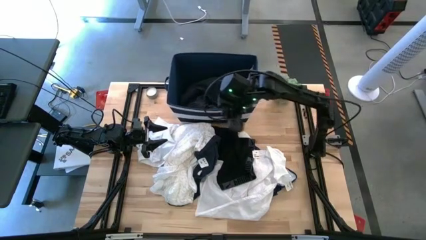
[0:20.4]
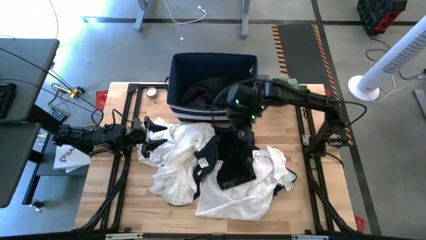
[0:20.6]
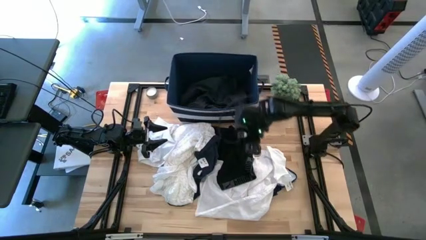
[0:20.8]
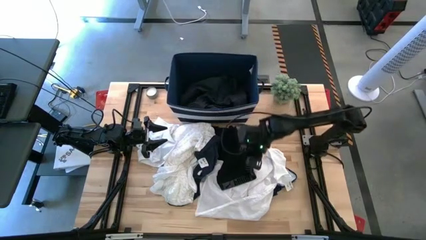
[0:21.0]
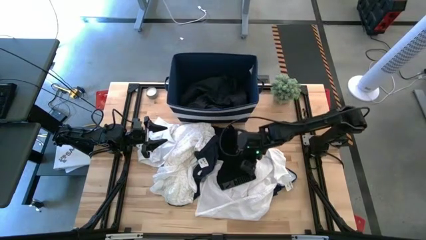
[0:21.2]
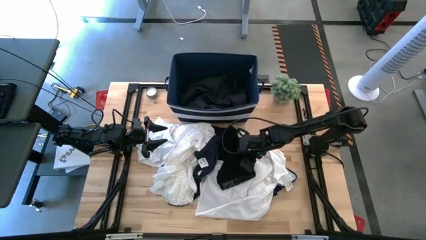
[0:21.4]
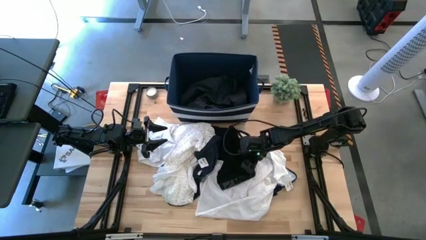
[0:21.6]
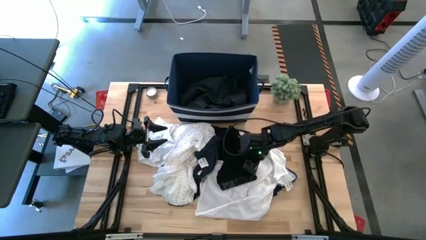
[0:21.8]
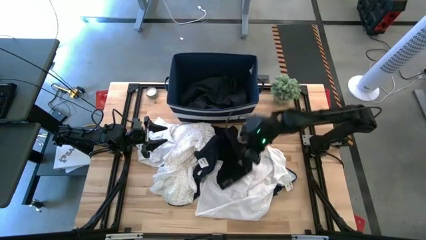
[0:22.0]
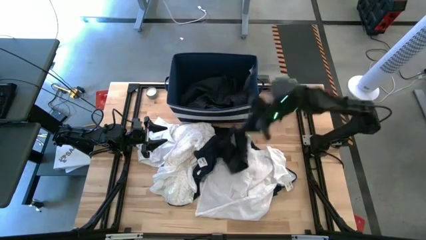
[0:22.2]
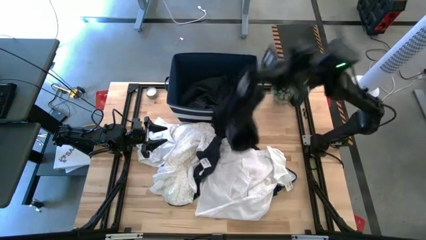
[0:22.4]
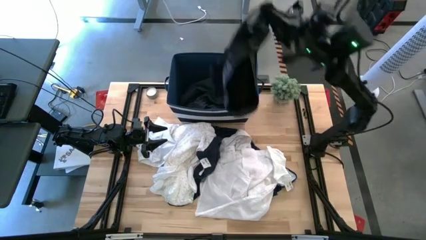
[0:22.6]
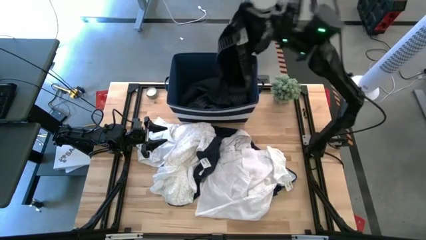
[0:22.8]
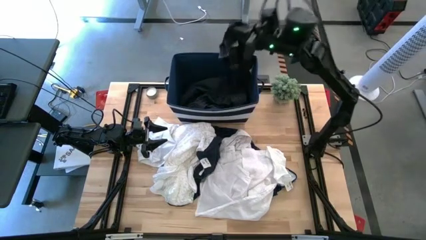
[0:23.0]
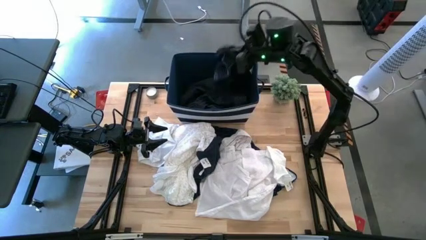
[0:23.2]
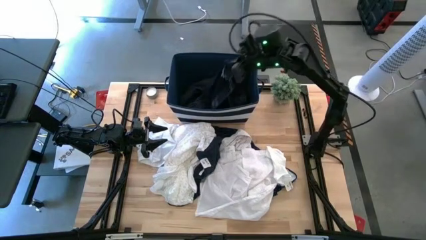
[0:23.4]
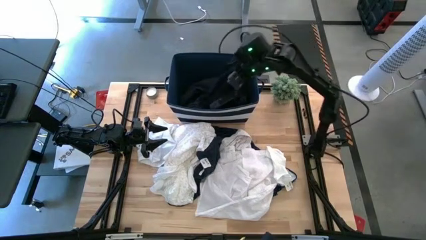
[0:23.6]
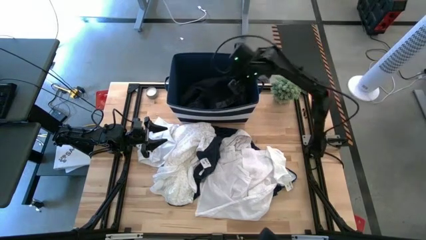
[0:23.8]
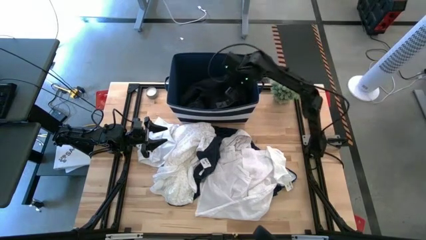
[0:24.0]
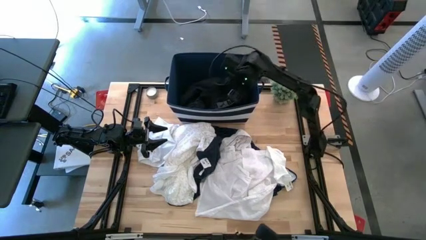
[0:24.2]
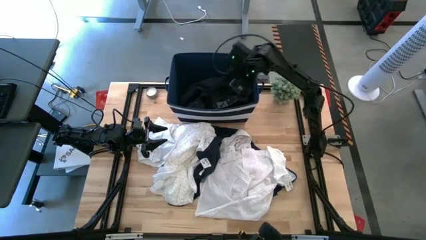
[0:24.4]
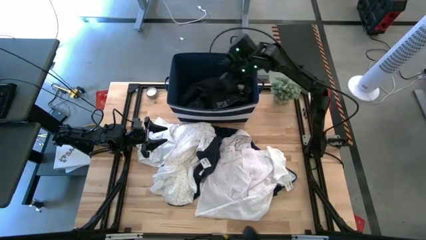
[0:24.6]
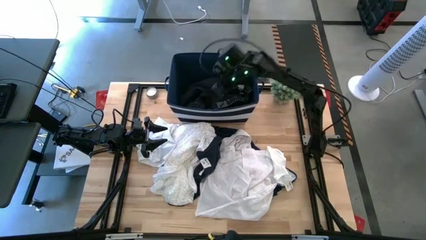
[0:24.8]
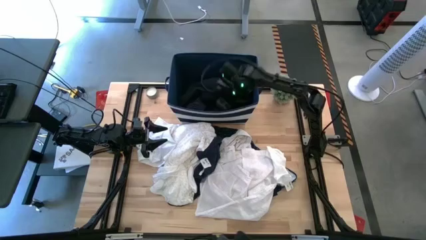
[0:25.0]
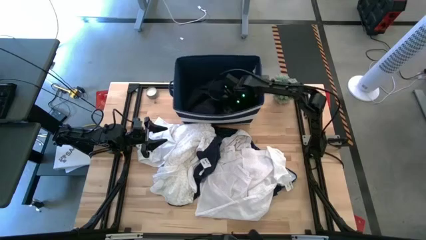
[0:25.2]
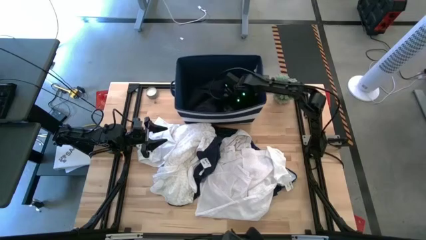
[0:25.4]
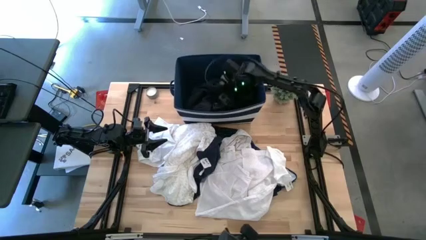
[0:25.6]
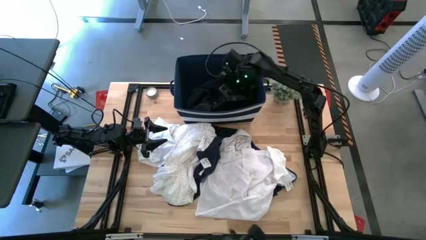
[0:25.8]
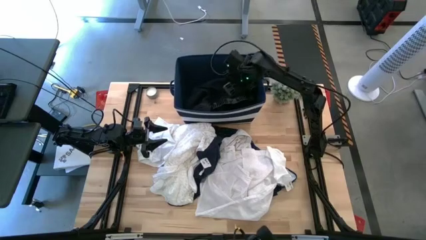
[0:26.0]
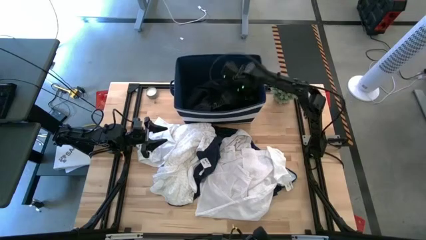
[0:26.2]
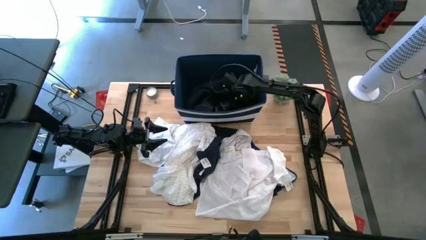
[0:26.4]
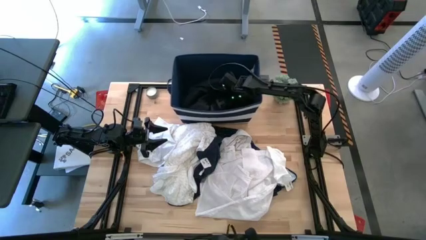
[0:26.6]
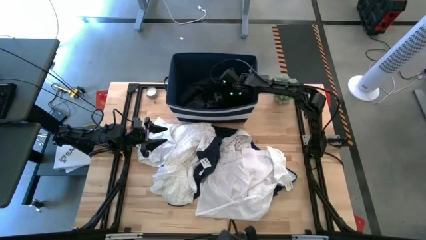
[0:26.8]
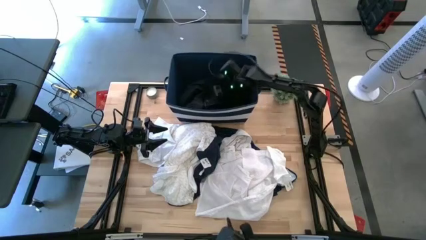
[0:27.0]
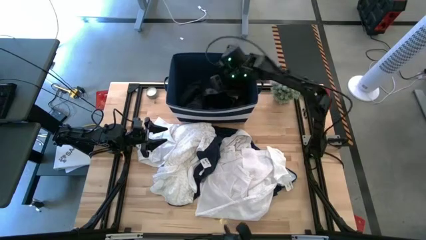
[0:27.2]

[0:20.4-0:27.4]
Task: Sort clothes
Put the black boxer into the blue bin

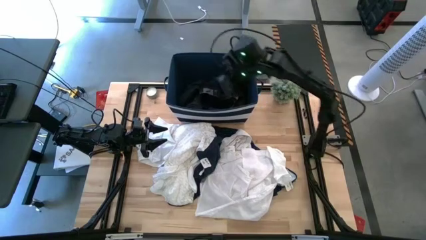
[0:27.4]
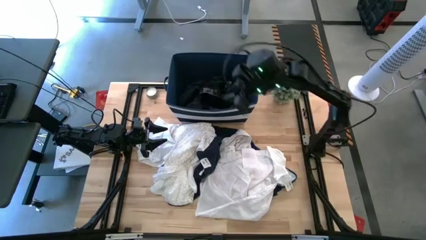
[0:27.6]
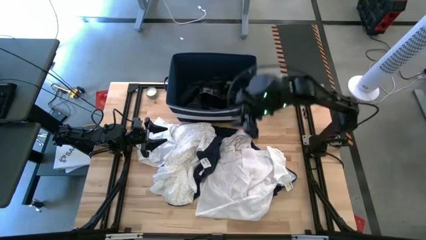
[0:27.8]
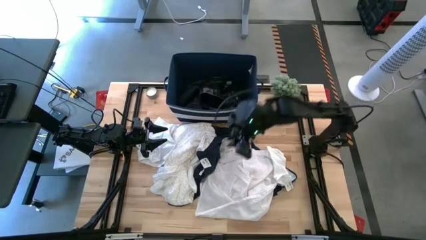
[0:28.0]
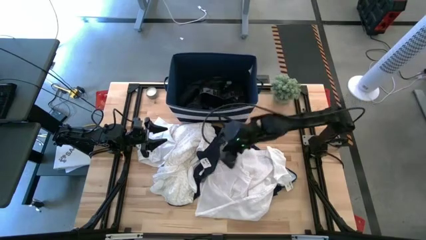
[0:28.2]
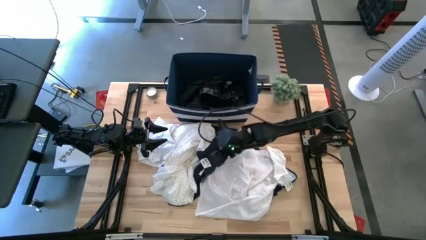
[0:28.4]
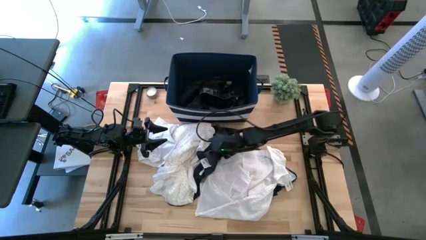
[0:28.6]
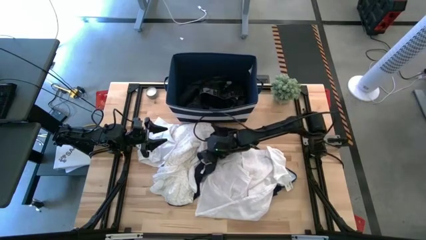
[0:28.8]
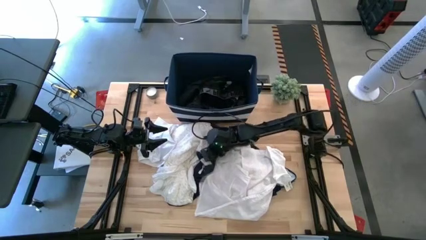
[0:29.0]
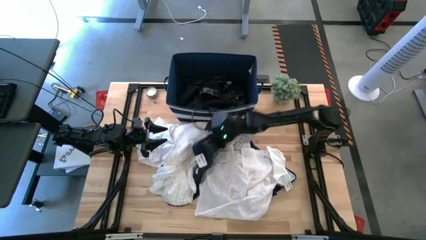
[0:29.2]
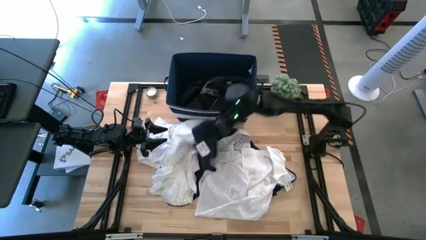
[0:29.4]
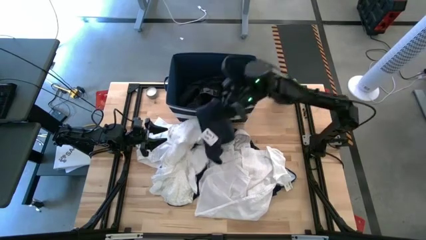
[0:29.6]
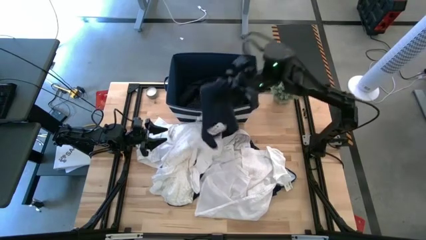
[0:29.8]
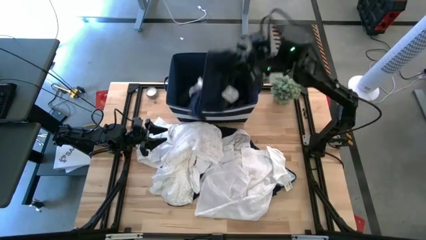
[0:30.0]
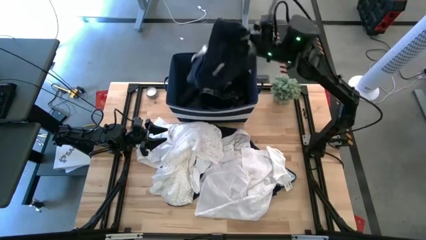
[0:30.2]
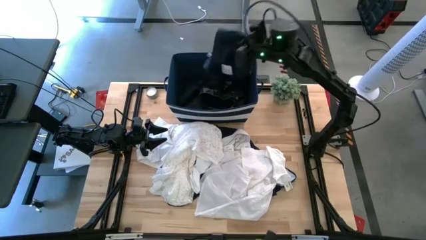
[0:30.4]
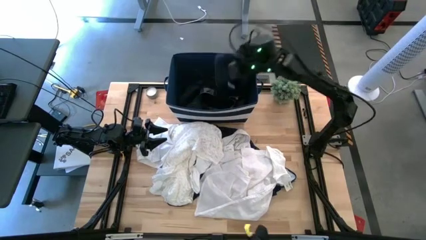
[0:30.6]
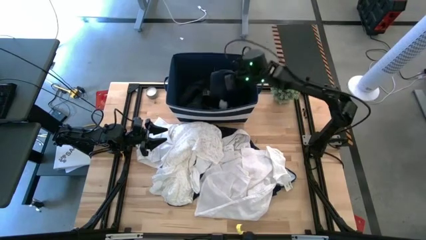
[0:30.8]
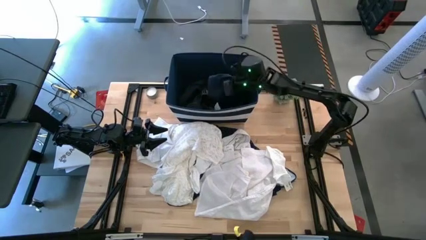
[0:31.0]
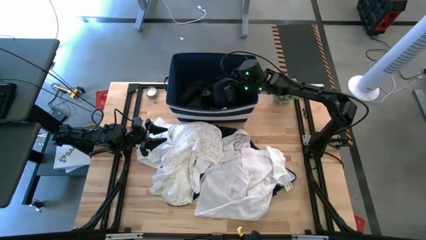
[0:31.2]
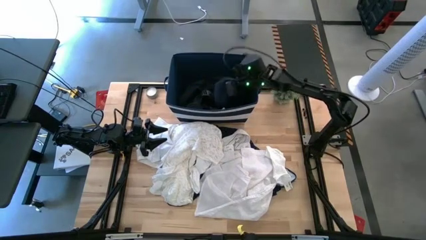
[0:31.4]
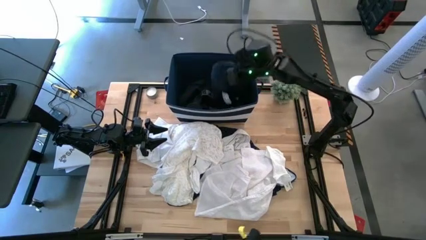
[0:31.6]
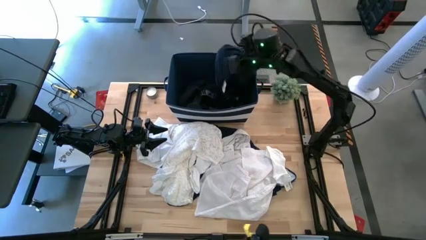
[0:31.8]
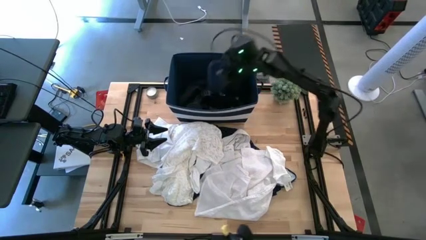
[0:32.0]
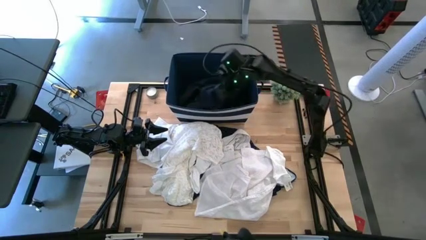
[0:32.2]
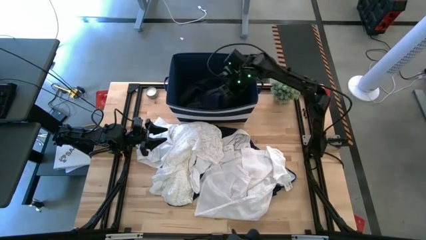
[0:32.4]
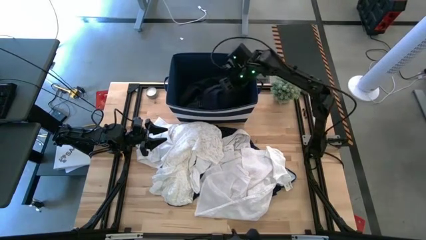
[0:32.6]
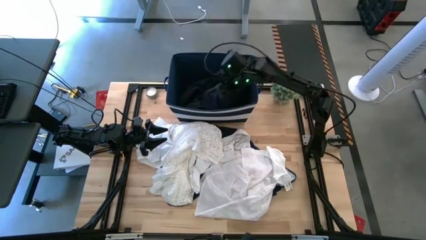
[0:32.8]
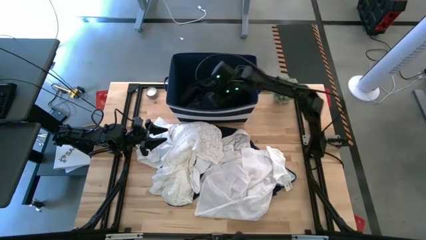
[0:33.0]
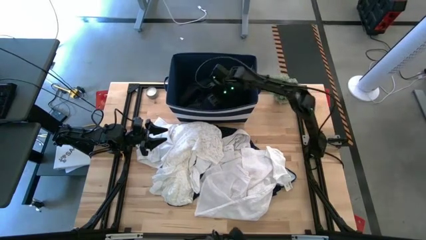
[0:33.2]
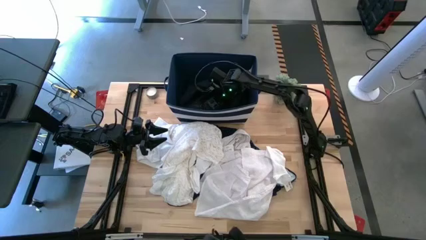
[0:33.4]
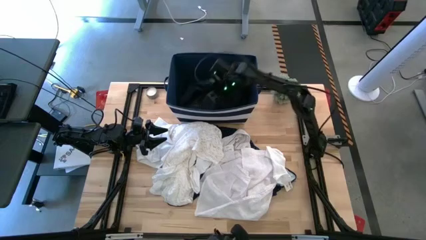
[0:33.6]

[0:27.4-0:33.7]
Put the blue shorts into the blue bin

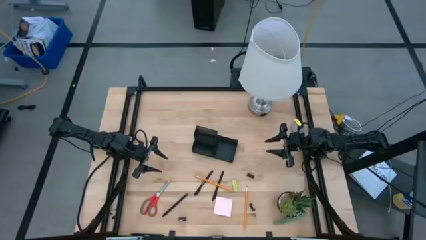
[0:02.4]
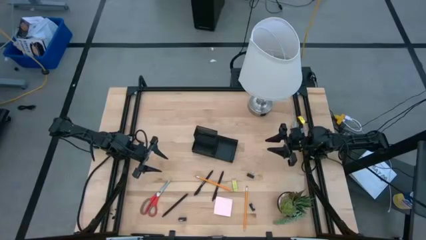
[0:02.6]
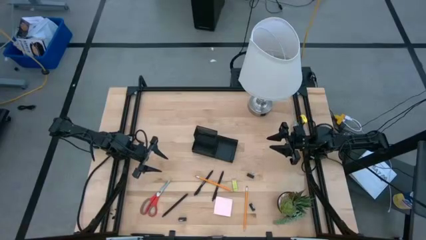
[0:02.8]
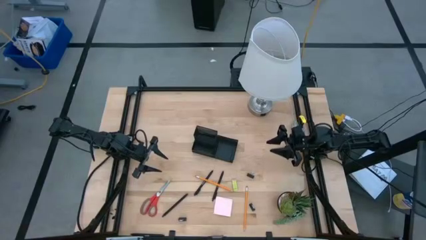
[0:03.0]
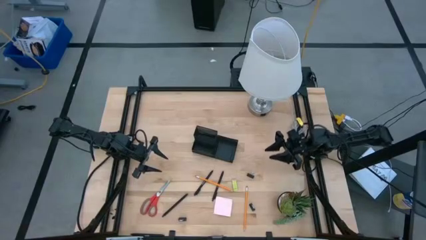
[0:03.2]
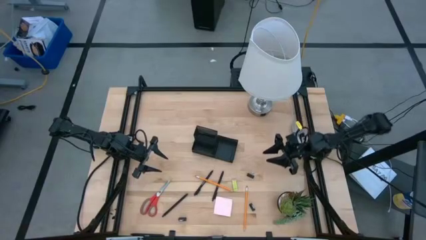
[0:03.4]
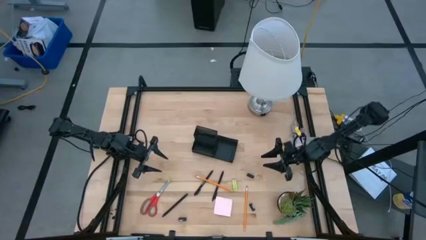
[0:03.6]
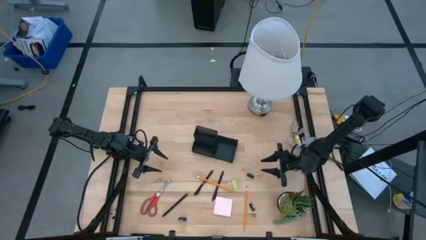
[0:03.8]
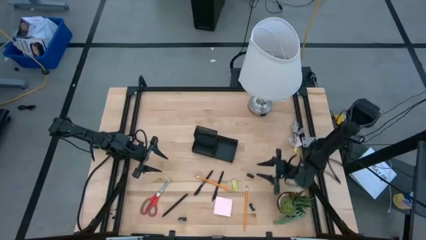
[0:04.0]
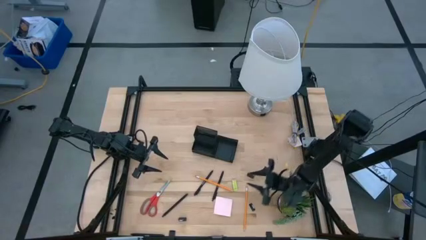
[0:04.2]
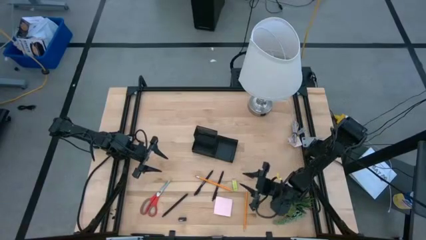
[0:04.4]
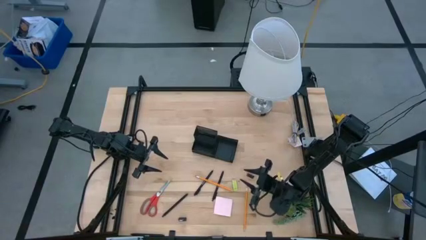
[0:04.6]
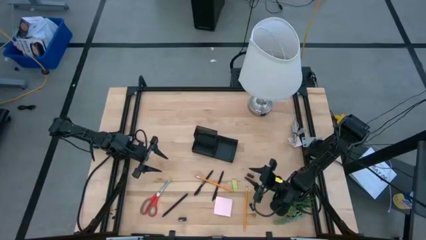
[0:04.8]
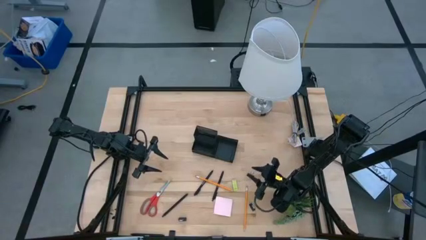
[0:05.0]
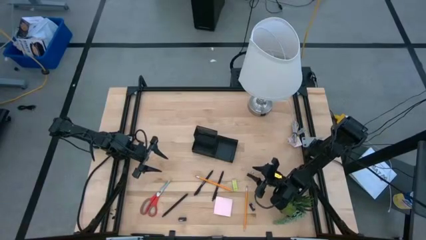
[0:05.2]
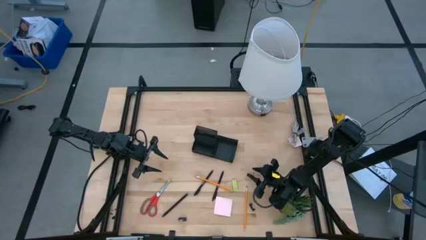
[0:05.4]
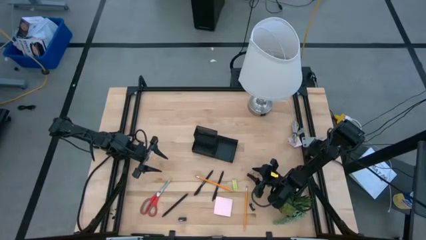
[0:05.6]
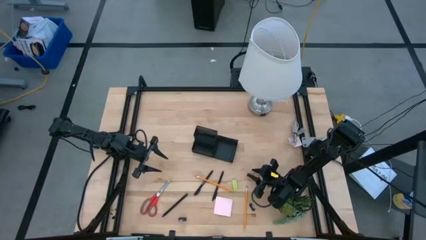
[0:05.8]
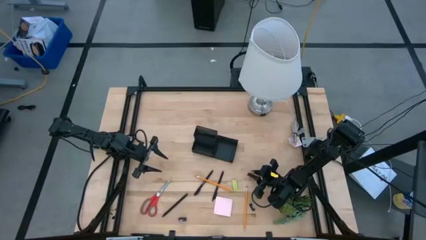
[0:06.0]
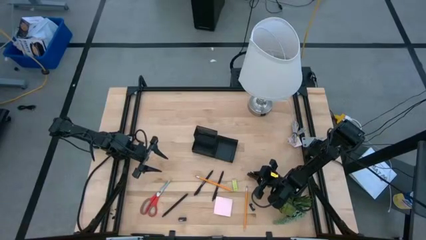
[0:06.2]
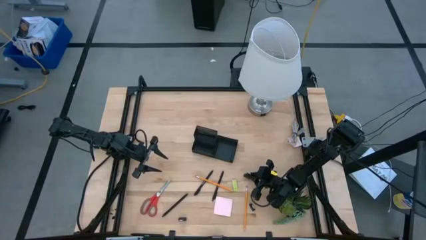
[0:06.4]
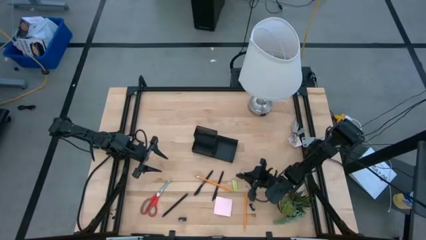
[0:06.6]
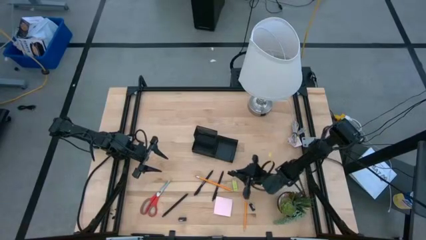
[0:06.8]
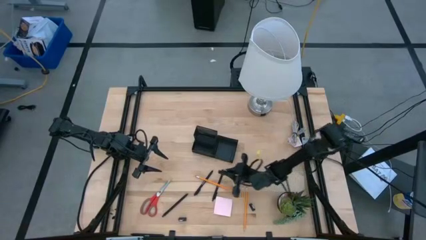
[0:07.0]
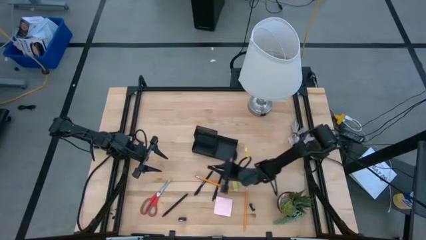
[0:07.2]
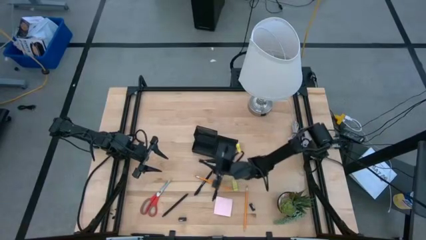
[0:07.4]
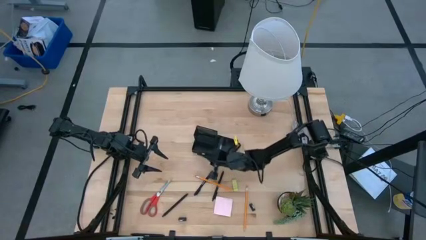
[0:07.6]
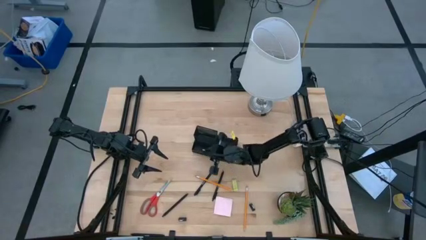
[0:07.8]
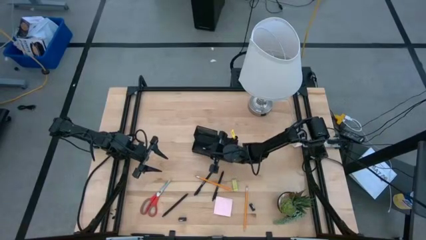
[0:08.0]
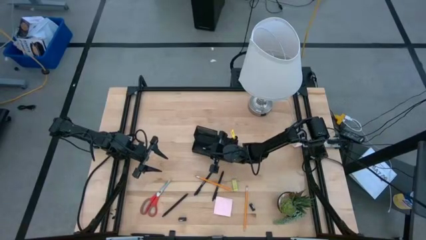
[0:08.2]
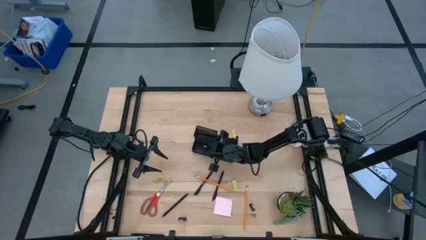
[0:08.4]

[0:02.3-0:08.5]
Task: Pick and place office supplies into organizer
Put the black binder clip into the black desk organizer
